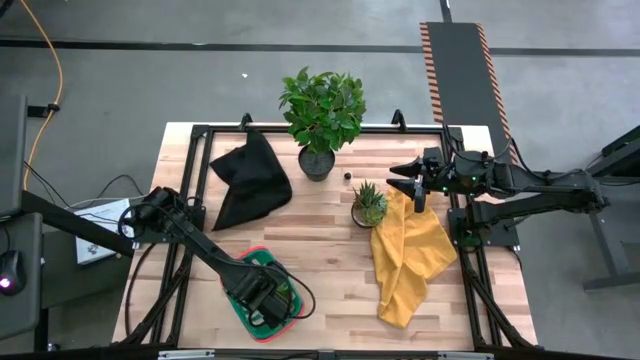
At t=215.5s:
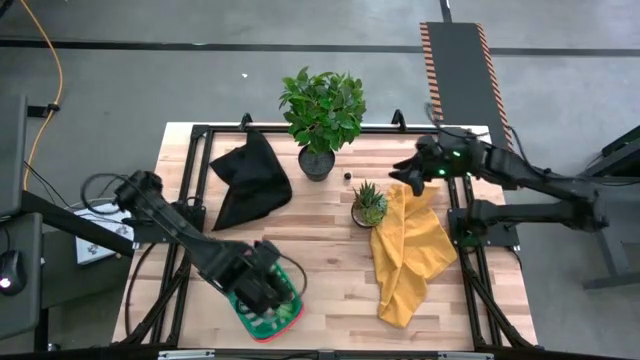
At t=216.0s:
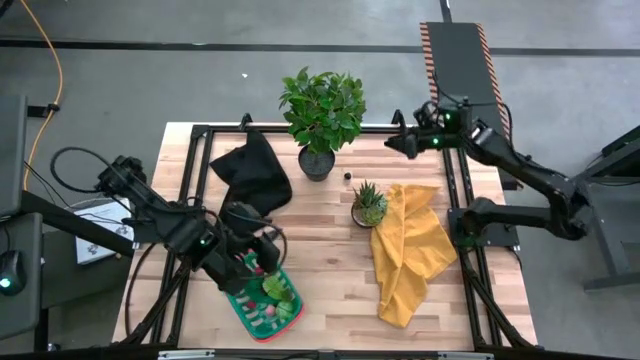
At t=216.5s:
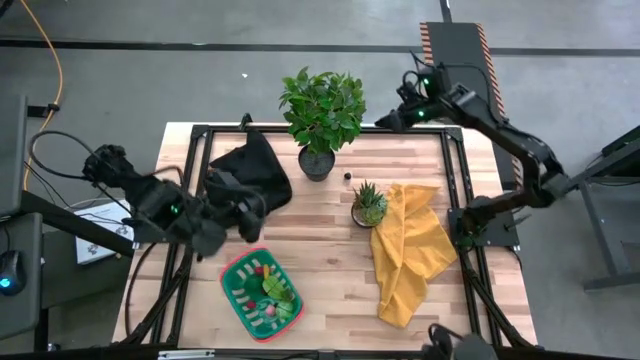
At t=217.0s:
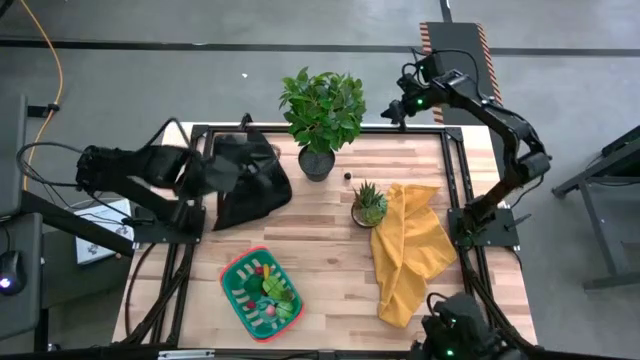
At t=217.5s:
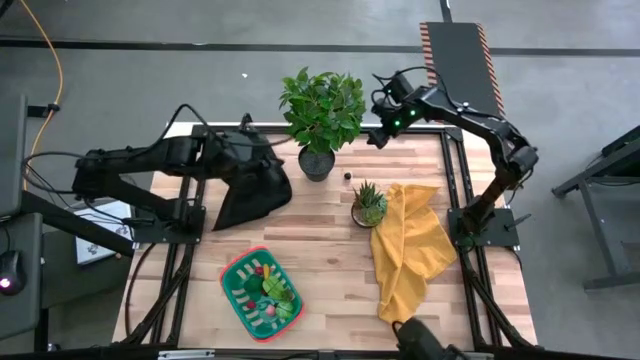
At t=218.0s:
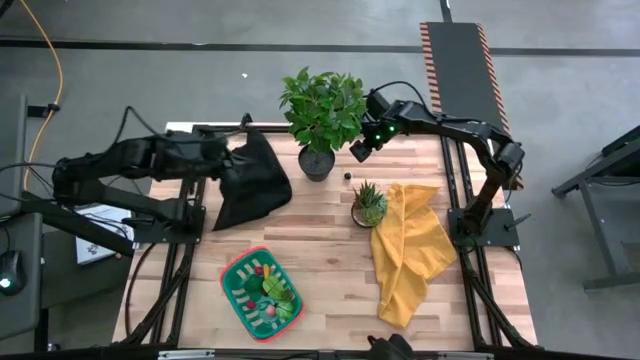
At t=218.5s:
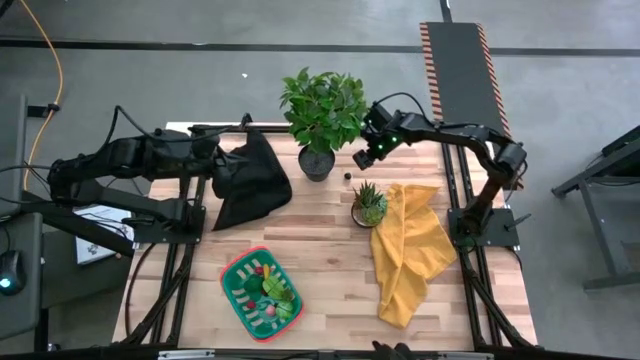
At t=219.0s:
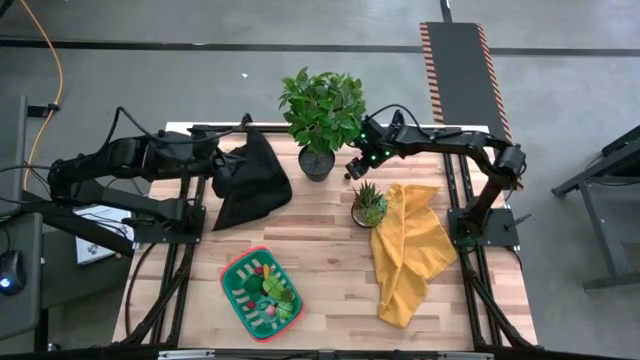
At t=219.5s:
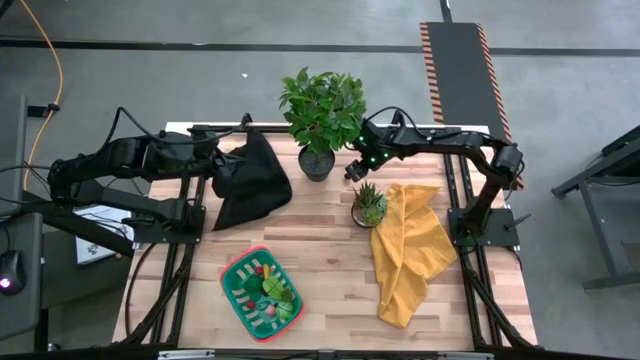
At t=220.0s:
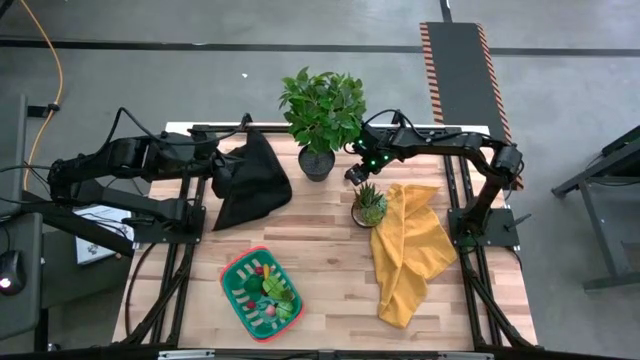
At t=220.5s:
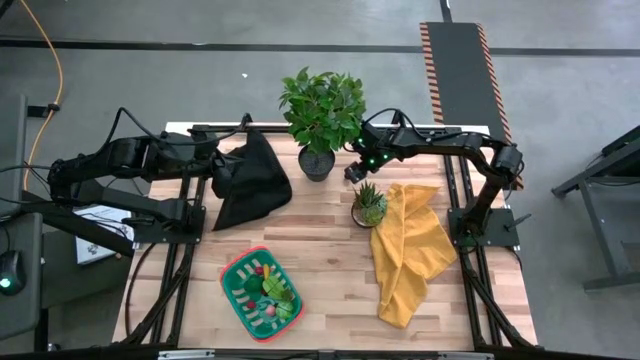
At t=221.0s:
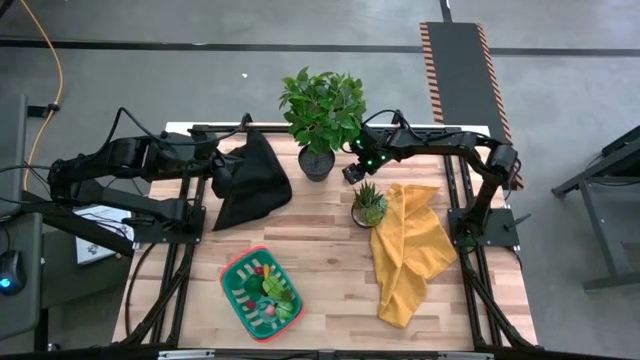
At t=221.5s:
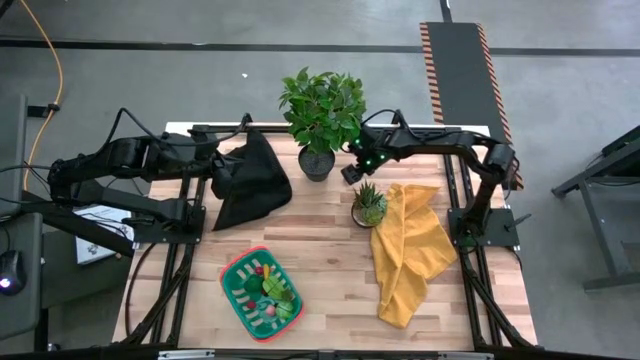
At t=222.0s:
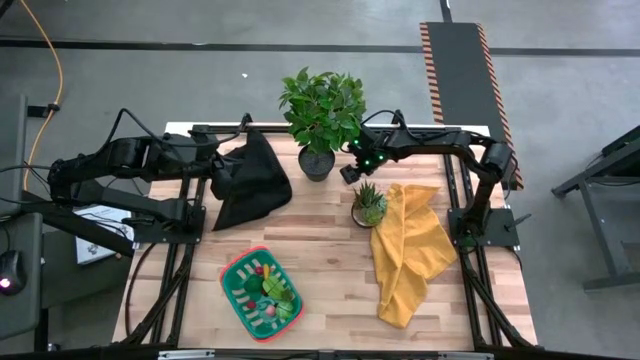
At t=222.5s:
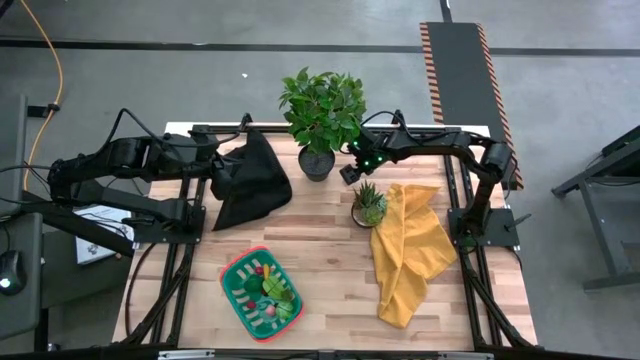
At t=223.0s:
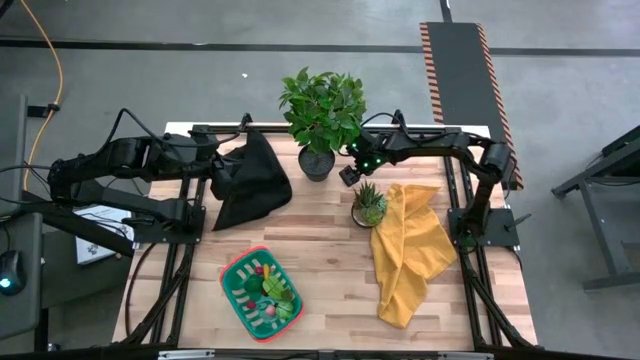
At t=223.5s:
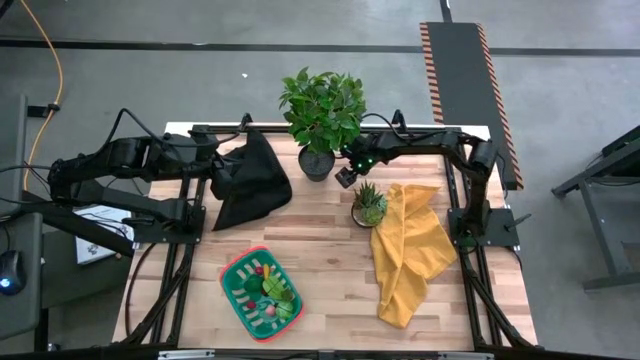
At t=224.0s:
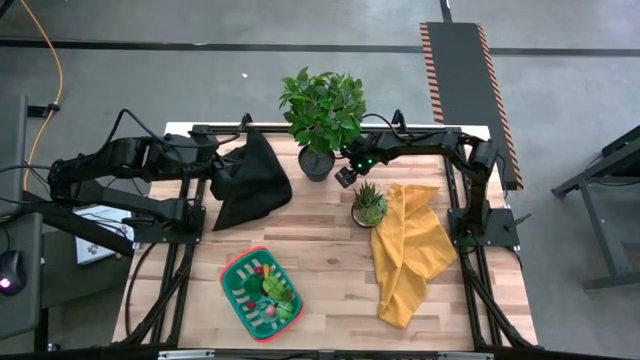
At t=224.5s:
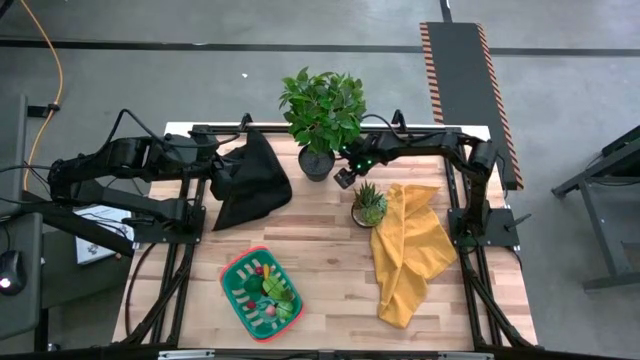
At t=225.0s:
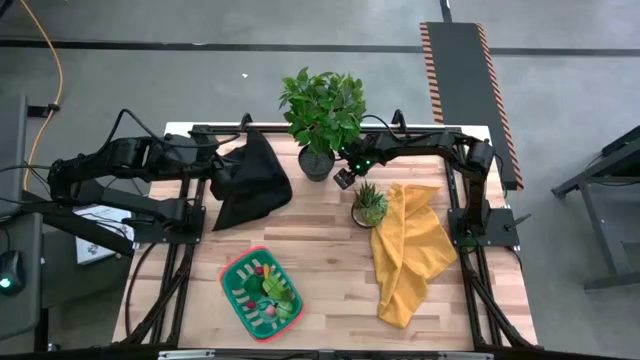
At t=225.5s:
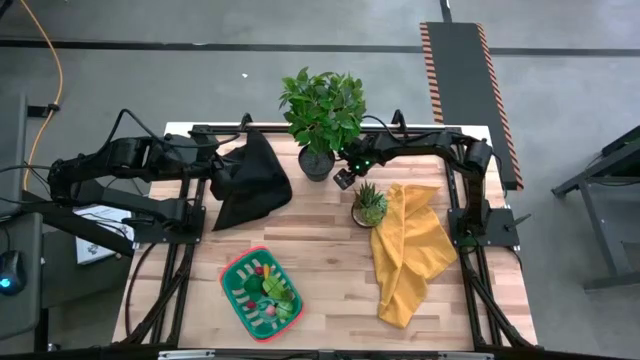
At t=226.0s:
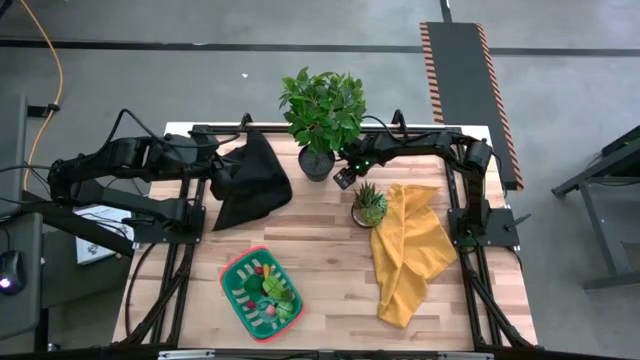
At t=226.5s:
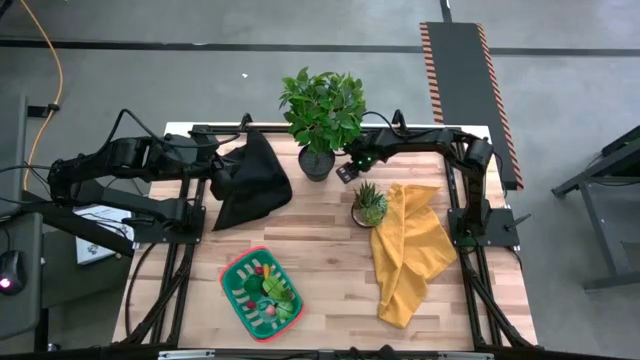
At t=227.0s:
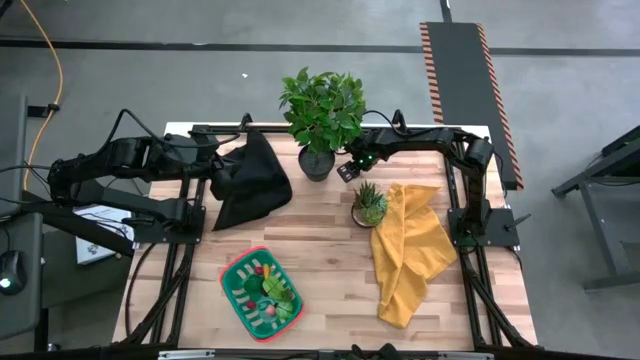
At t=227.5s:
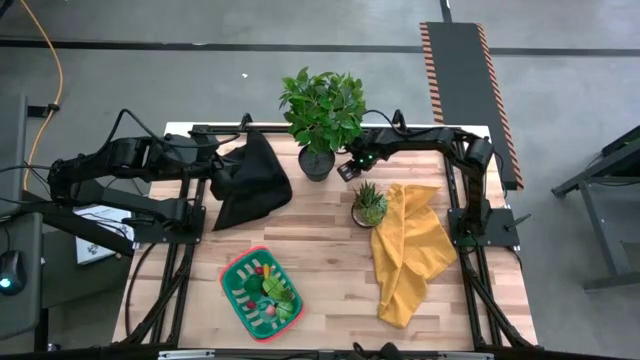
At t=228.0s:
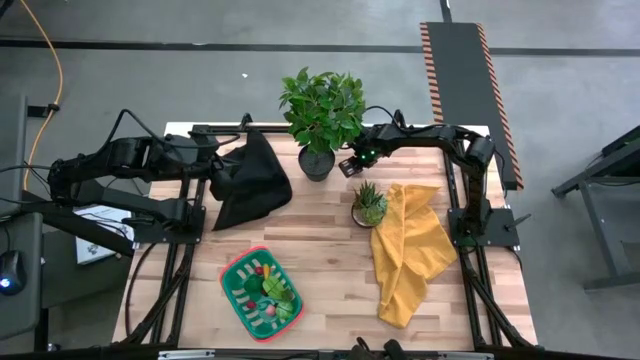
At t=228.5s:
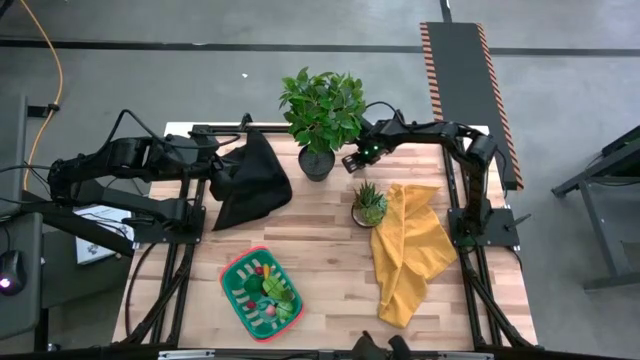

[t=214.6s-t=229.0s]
Task: Pick and placing Produce into tupperware
Put the black cherry into the blue basket

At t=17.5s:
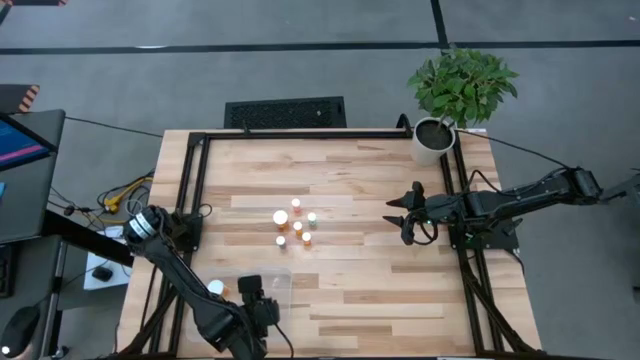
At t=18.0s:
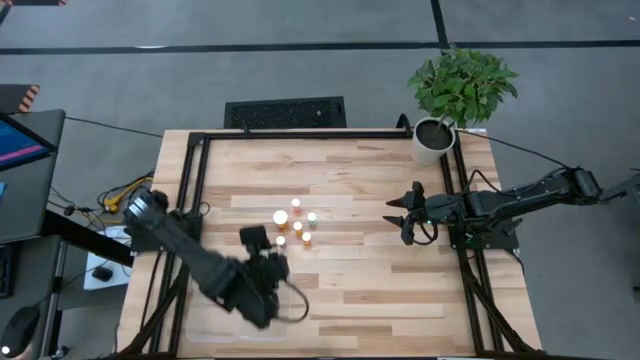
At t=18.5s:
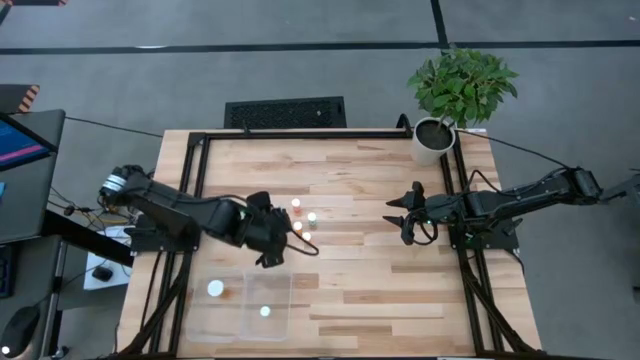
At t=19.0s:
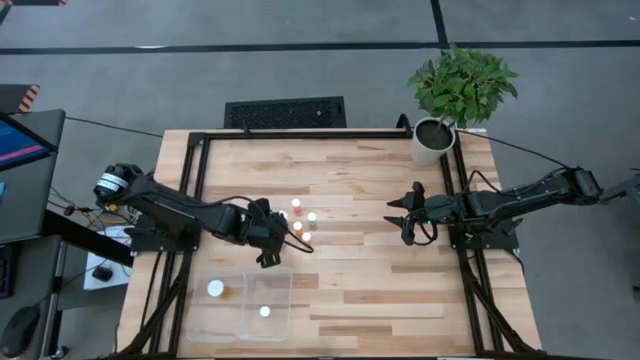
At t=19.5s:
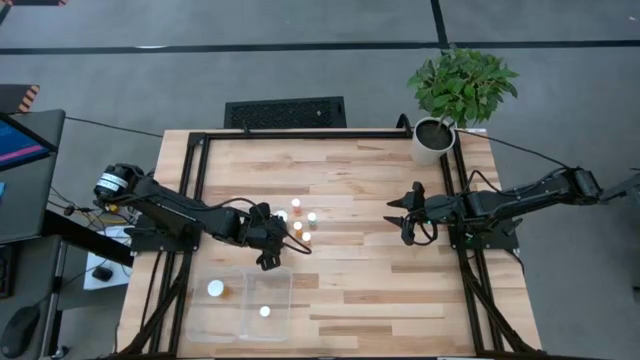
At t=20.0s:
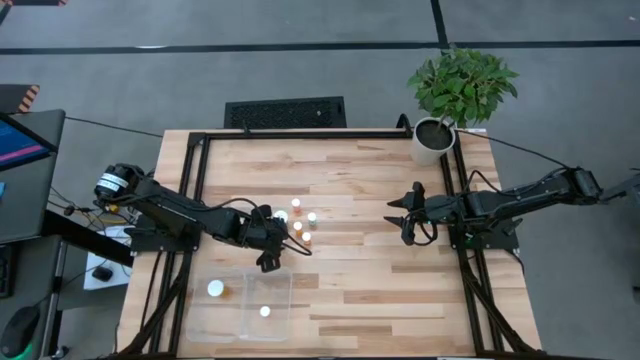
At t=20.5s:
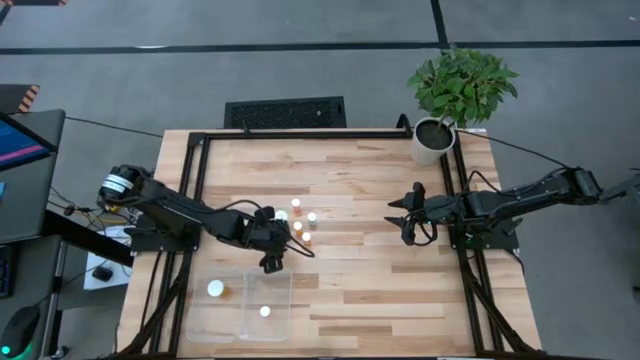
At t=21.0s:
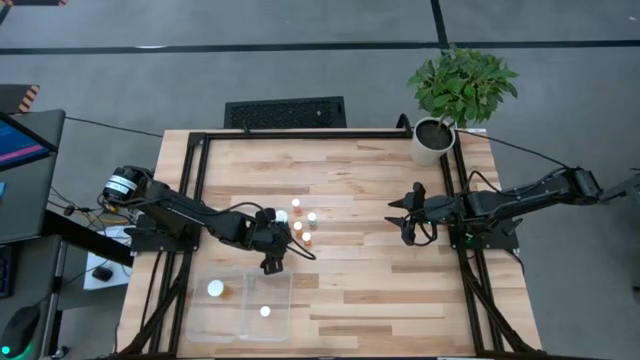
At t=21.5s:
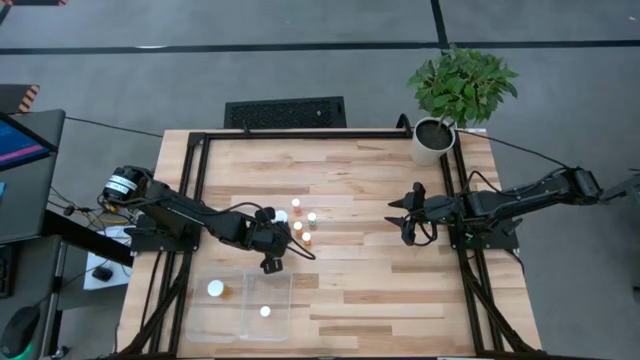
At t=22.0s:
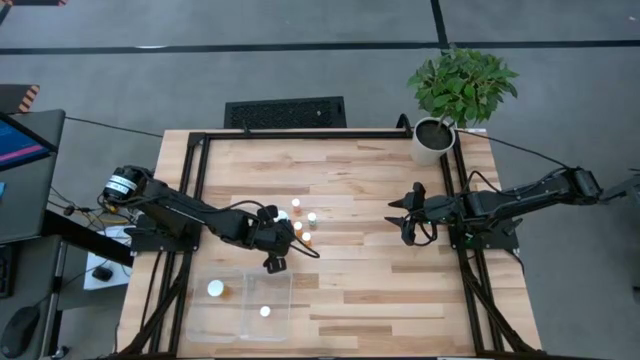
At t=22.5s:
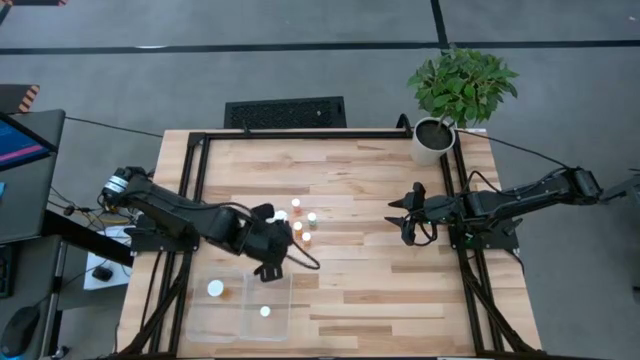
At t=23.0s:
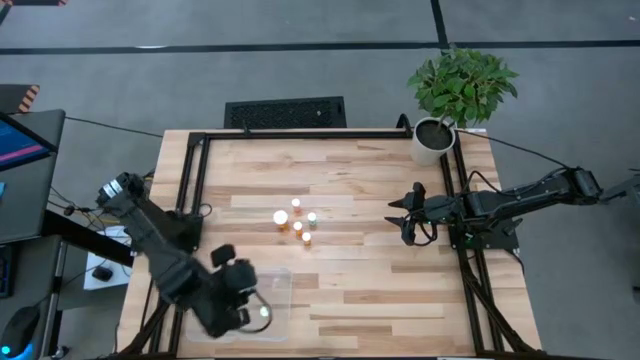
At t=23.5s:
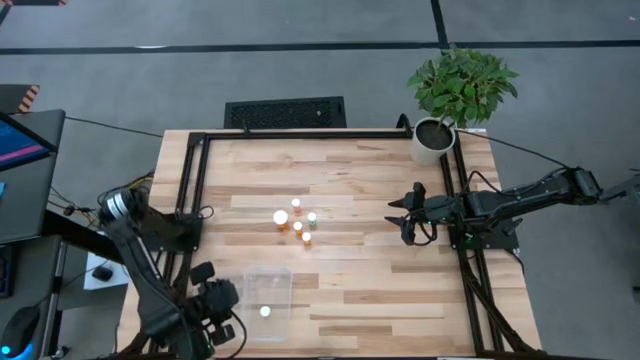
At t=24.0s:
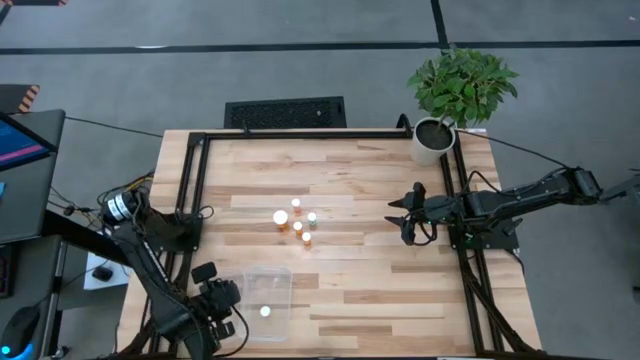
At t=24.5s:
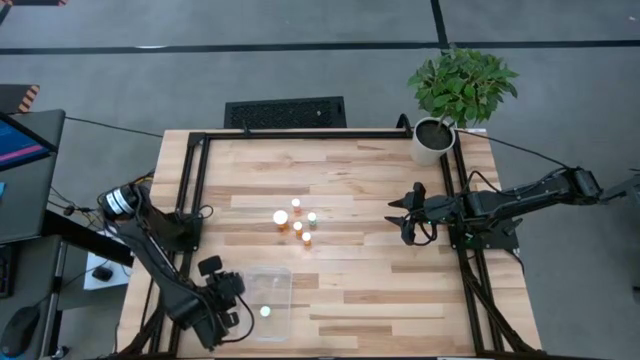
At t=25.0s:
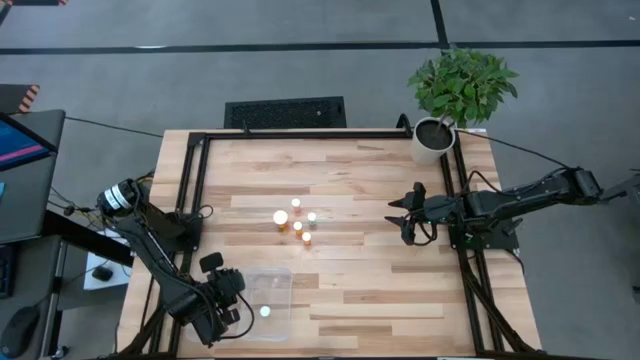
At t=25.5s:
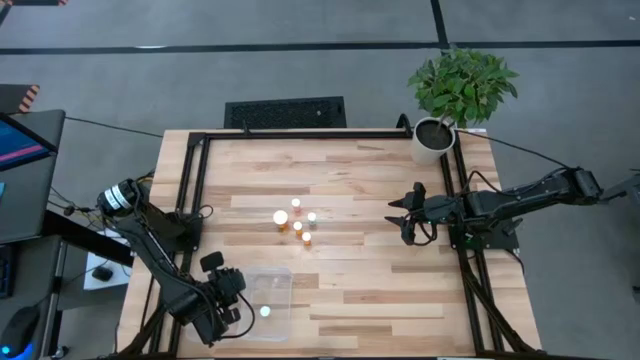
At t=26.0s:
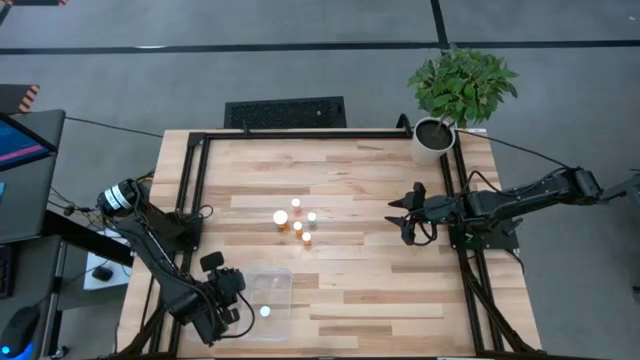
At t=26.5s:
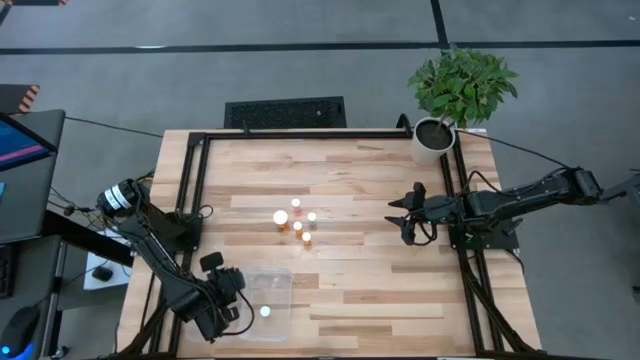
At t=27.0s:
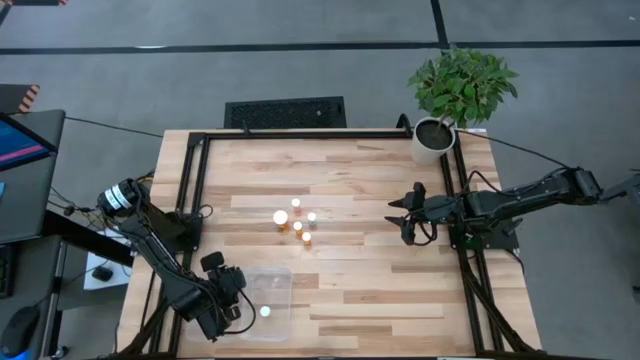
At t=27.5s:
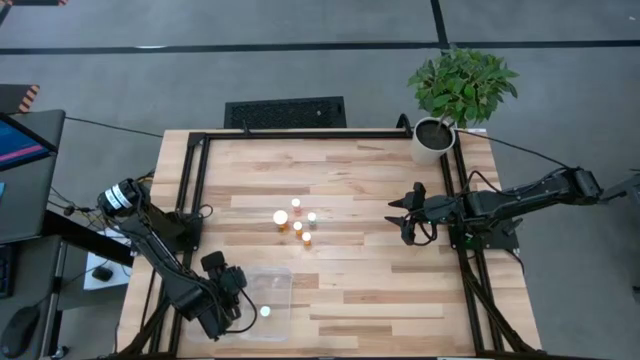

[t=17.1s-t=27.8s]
Task: Pick and place medicine bottles into bin by pill shape (circle, oval)
Put the blue pill bottle into the left transparent bin
